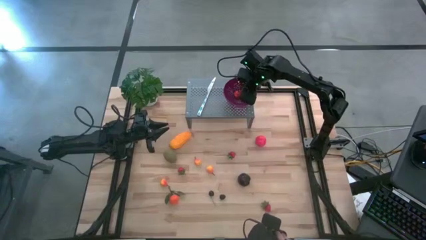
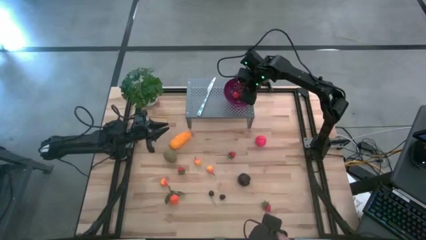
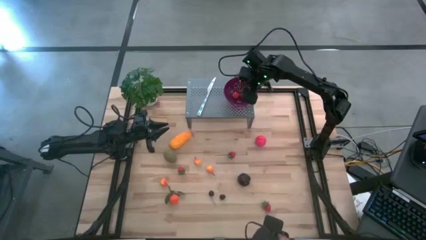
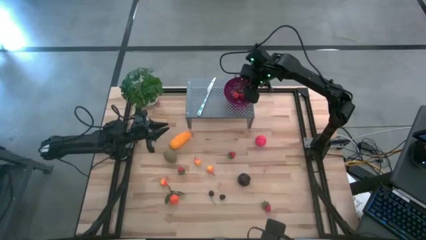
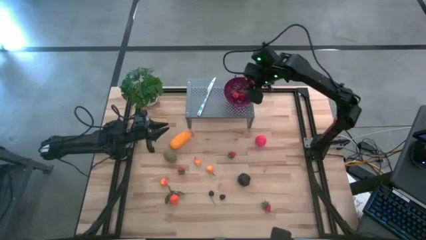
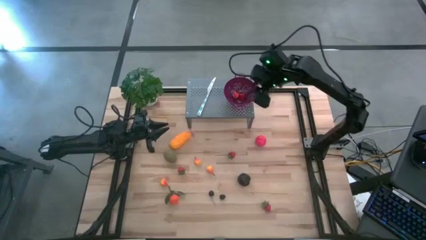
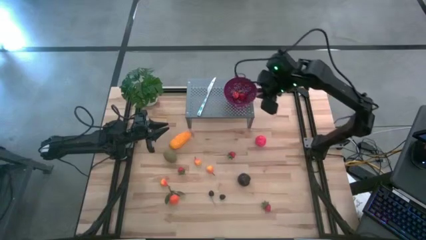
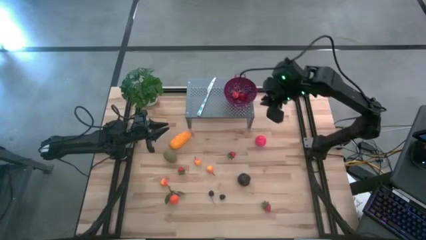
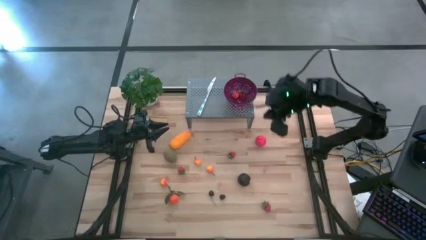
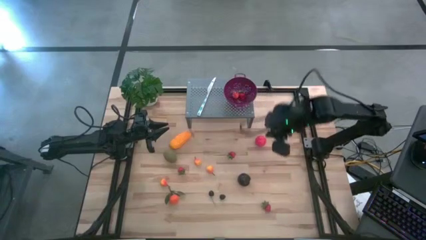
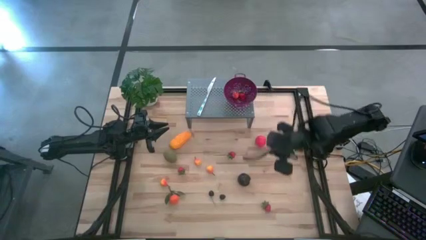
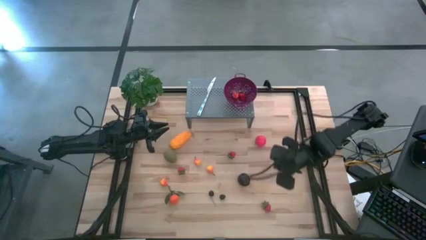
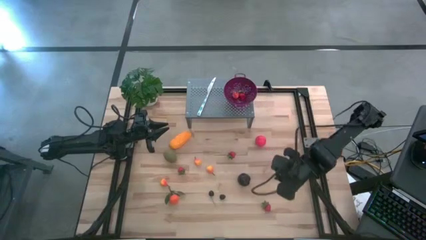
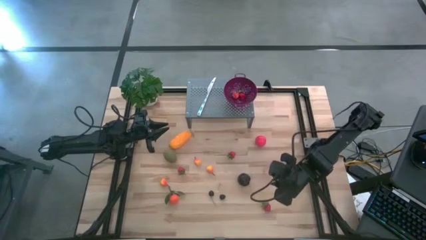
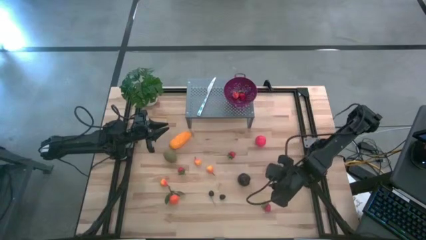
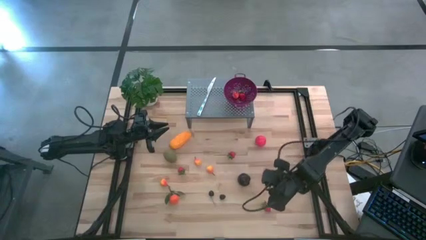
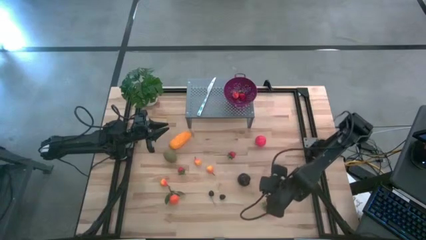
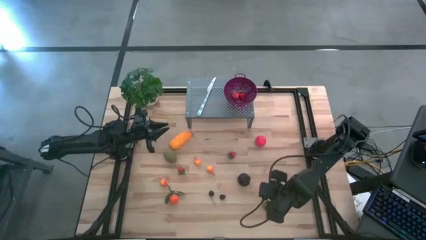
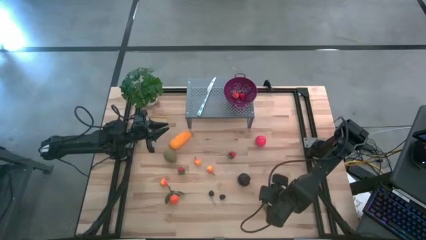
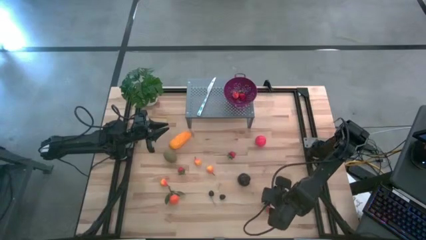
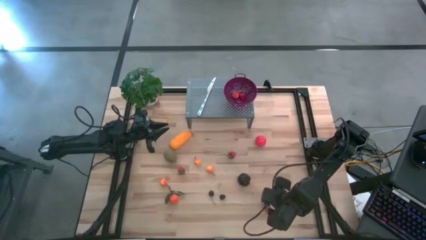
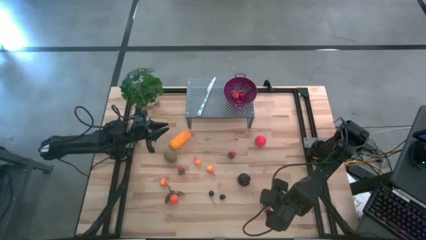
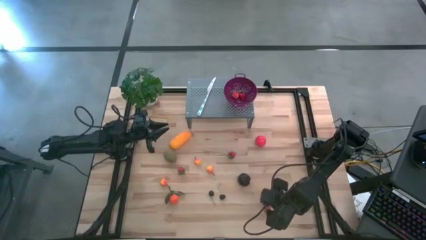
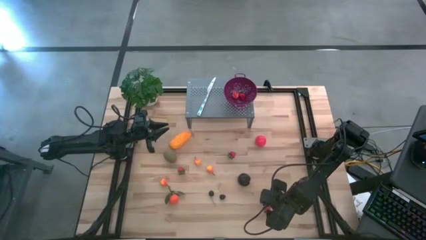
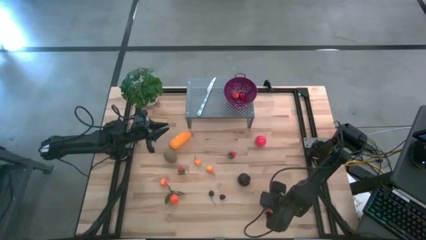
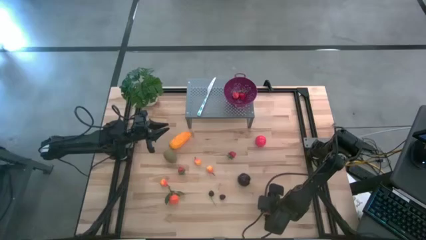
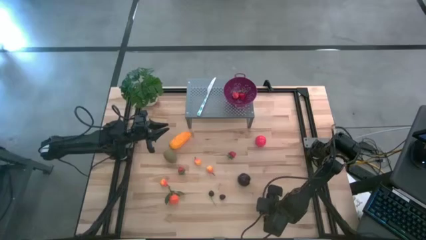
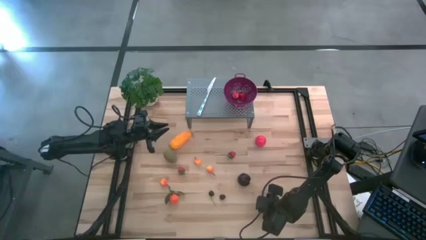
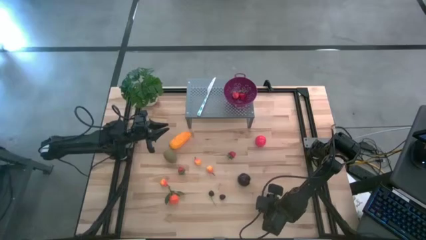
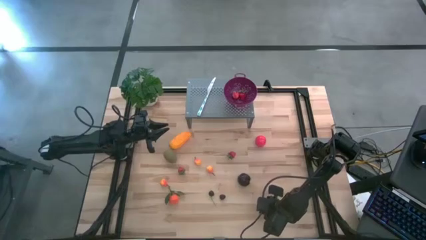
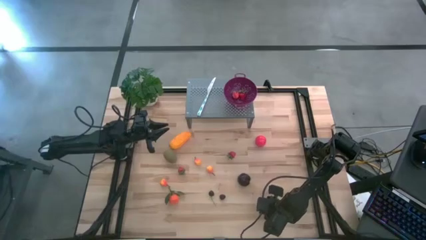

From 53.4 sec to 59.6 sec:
Task: Pick & Place Fruit
Put the red strawberry into the violet strainer bowl on the shelf

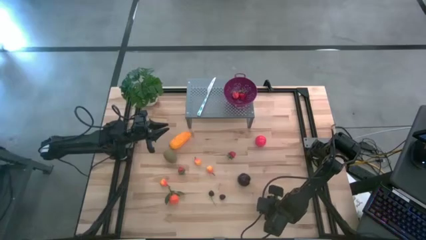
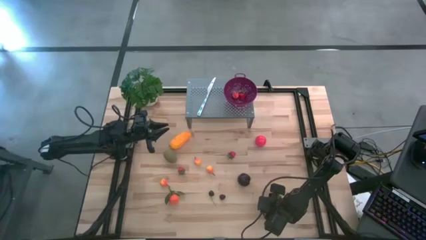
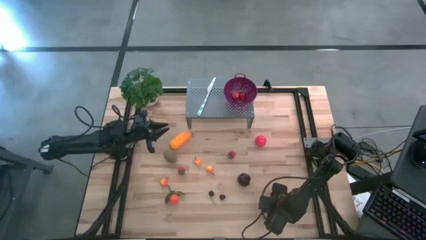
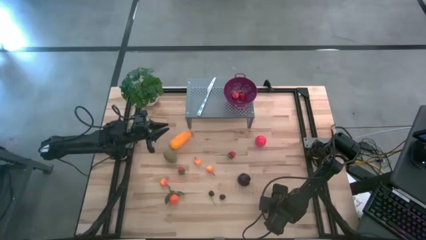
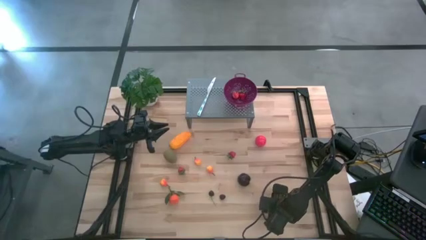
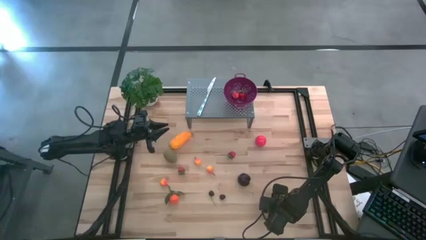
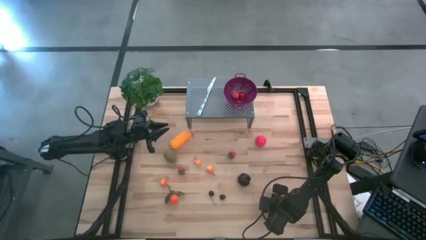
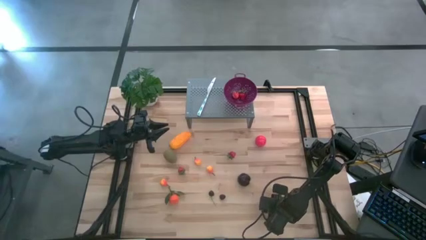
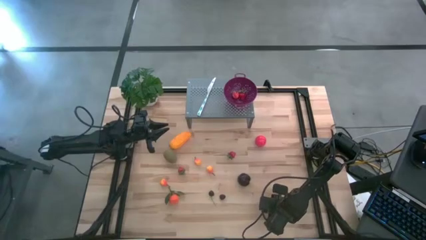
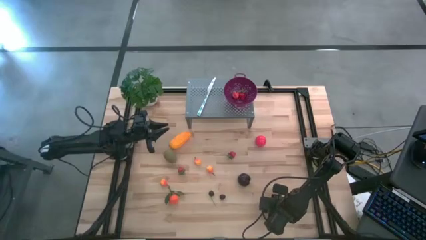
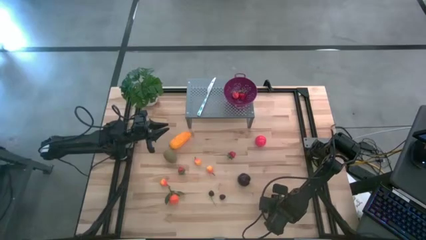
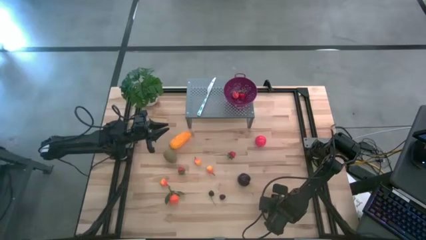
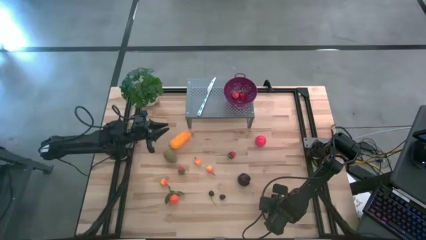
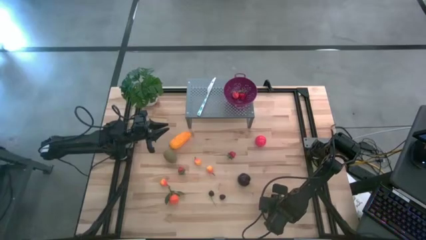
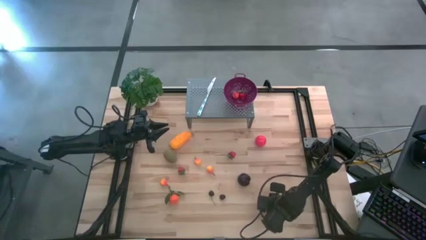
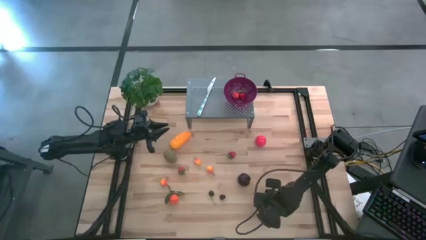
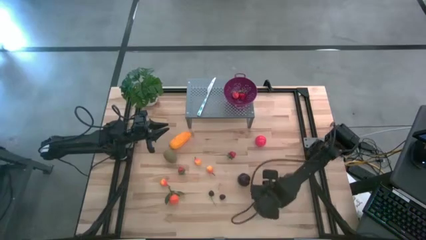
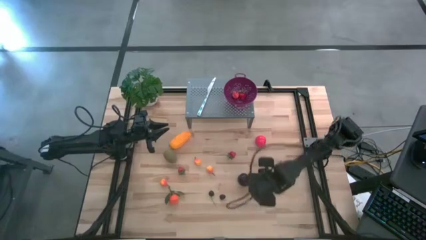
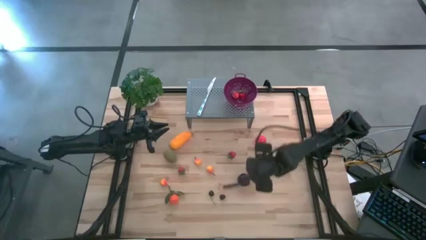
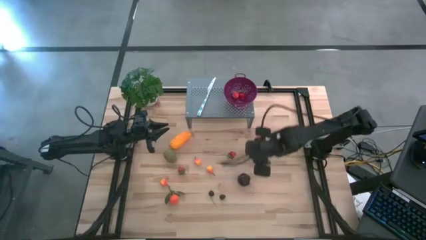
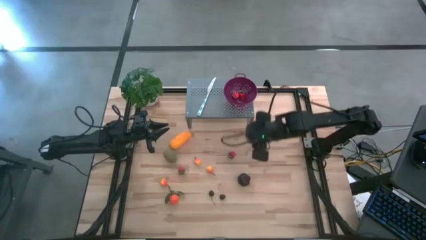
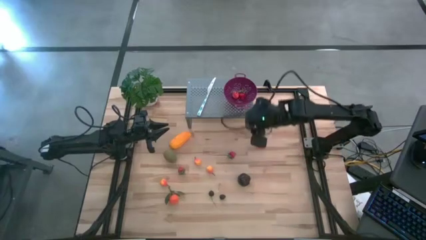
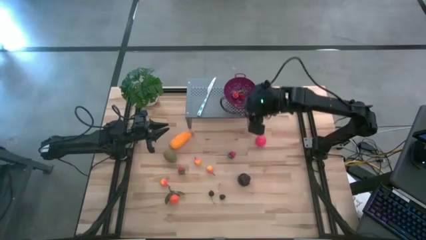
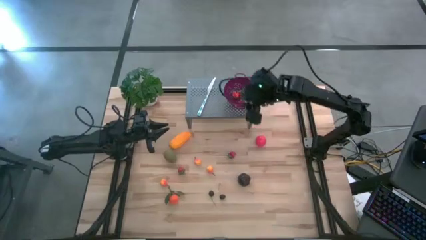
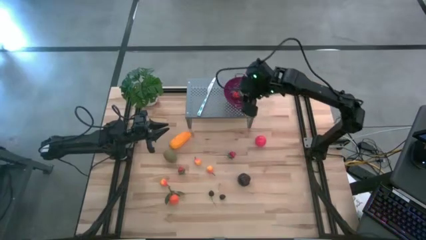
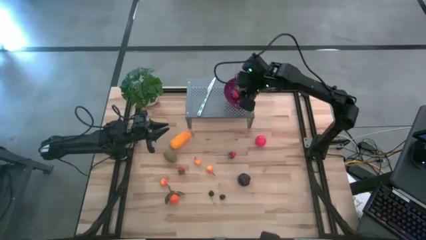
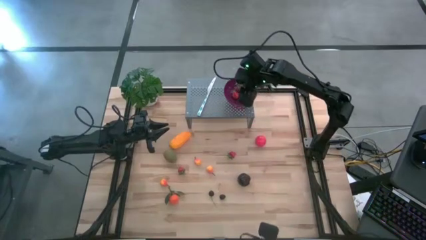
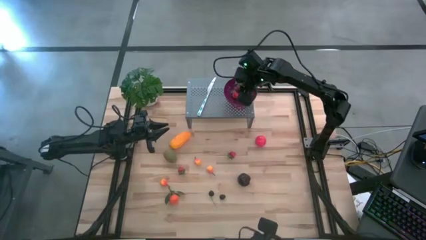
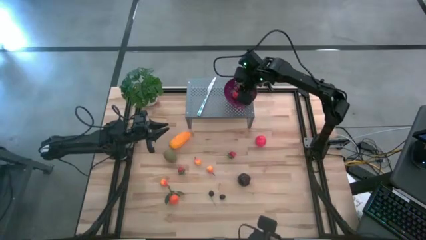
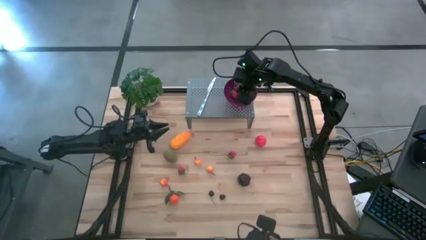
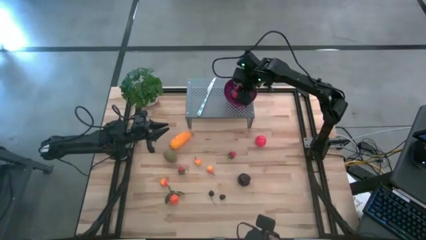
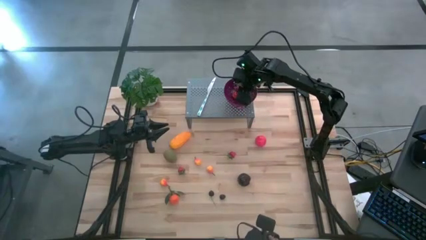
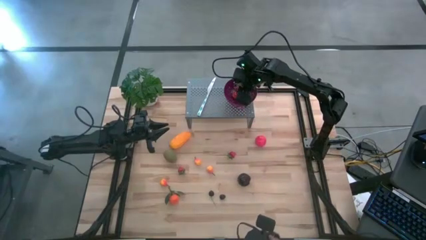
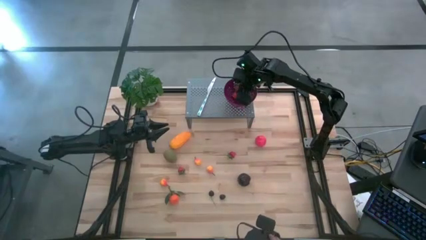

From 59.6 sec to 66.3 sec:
Put the red strawberry into the violet strainer bowl on the shelf
